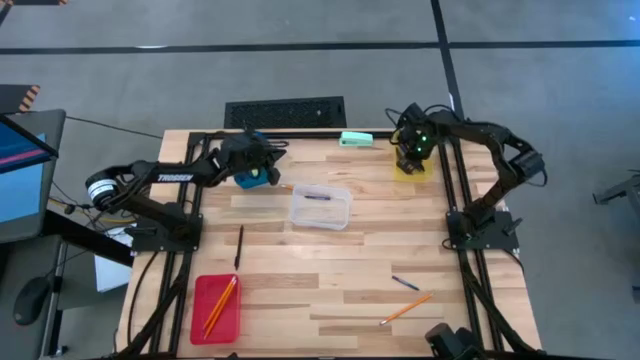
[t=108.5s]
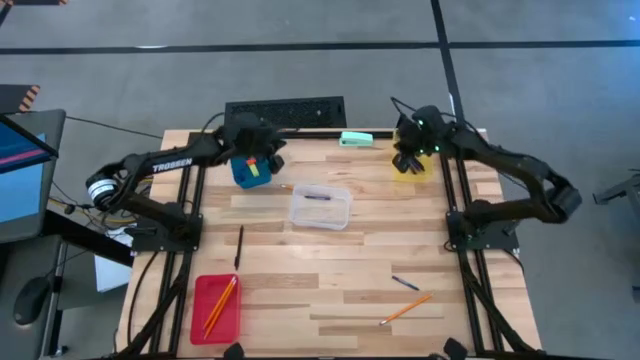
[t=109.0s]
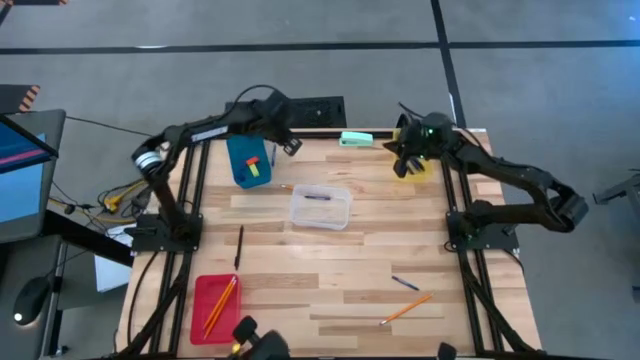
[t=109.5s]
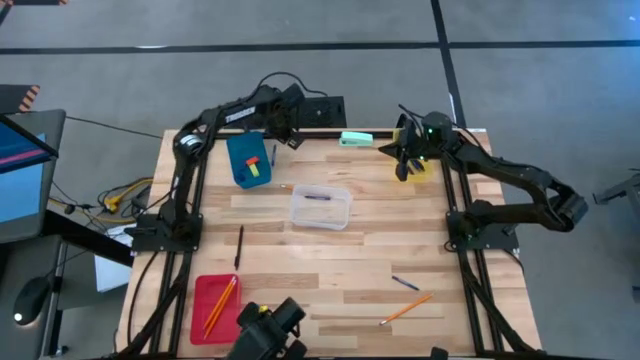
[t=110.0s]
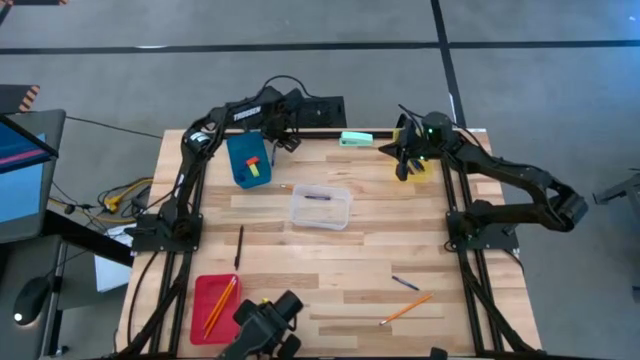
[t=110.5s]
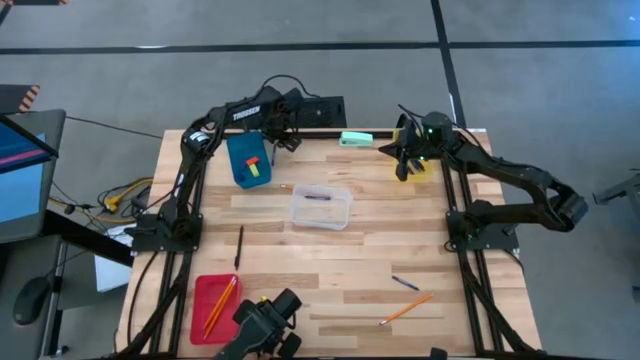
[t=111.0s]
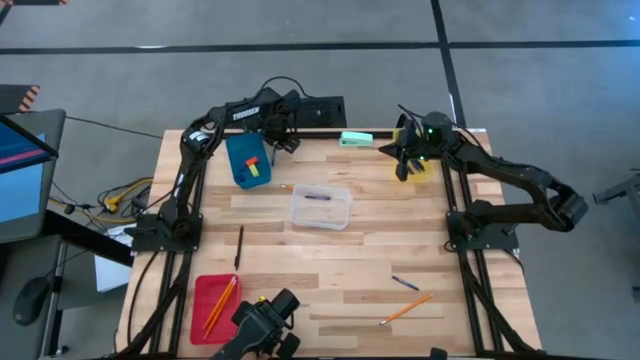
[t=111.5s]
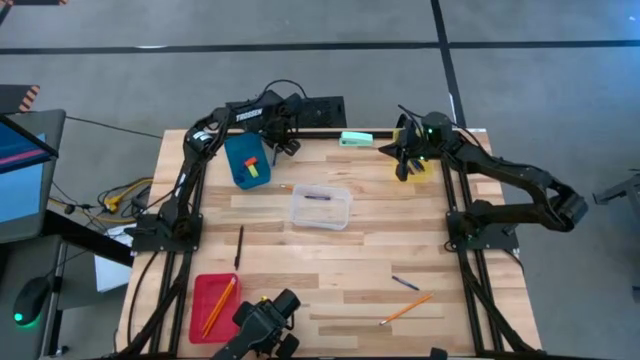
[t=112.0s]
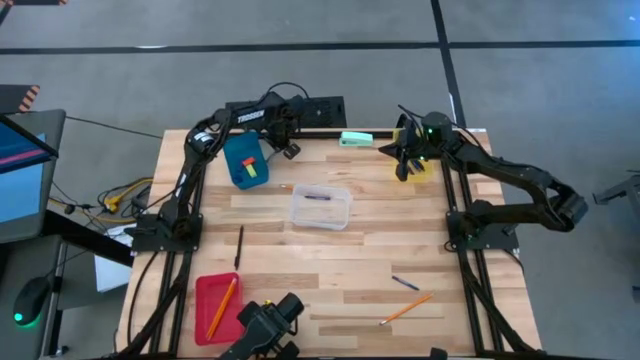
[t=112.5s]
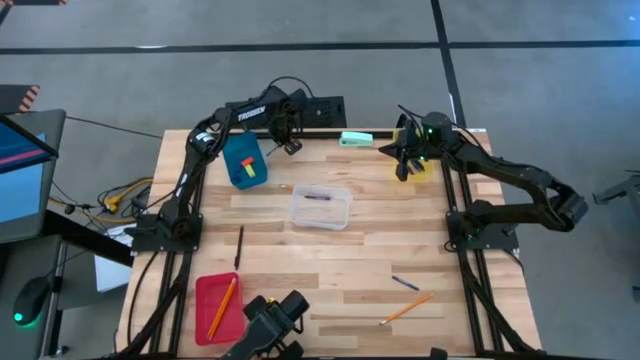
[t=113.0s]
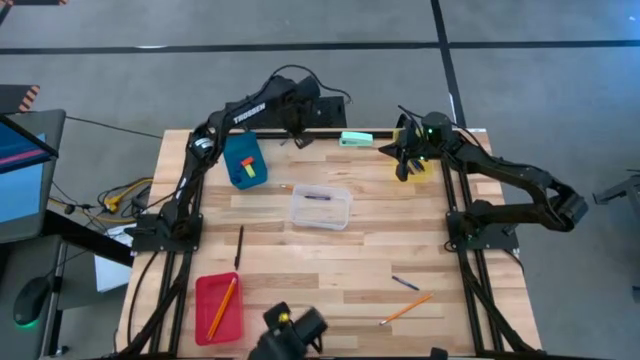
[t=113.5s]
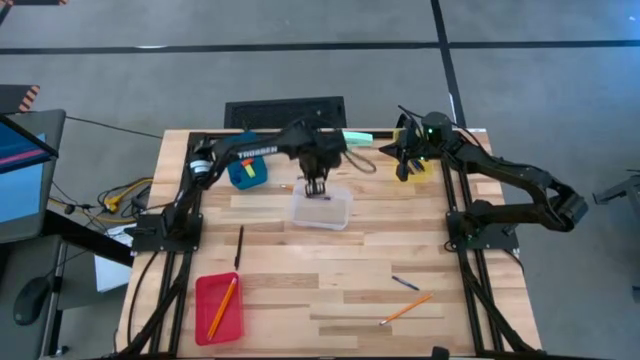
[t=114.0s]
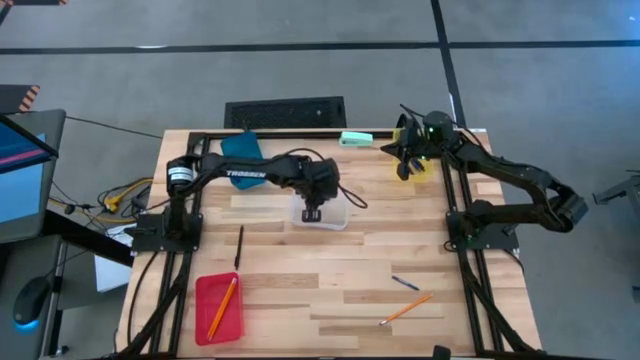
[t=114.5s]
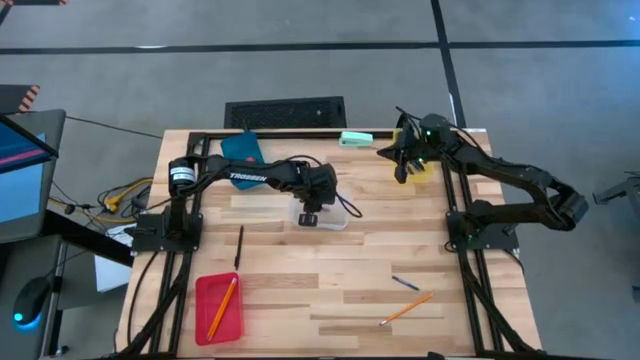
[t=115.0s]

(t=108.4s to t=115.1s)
Task: Sort crayons/erasers/pens/pencils in bins
Put the top blue crayon into the transparent bin

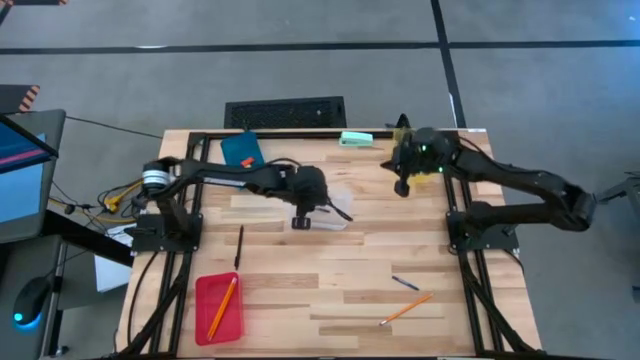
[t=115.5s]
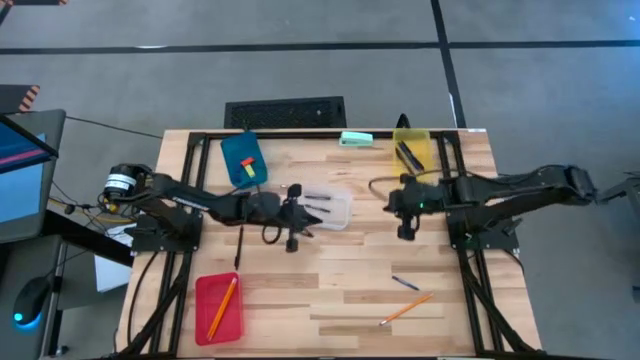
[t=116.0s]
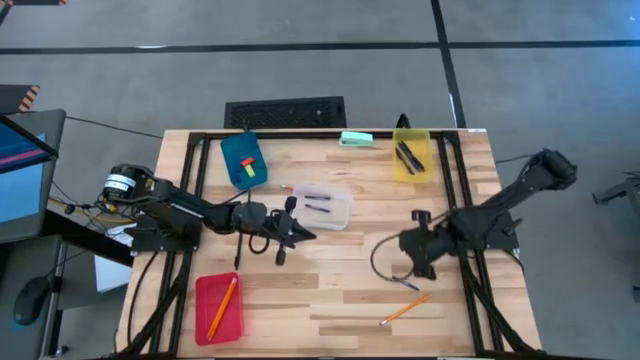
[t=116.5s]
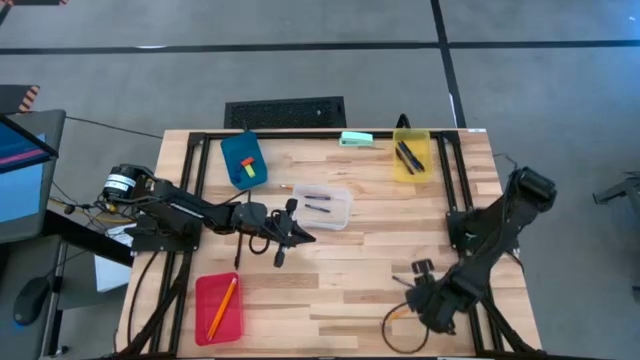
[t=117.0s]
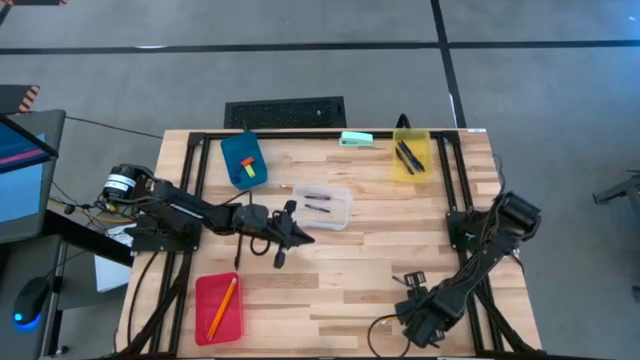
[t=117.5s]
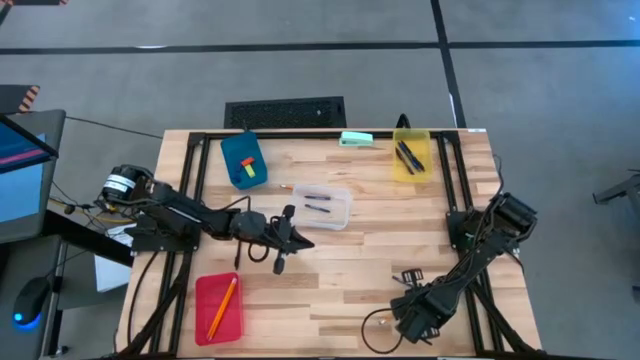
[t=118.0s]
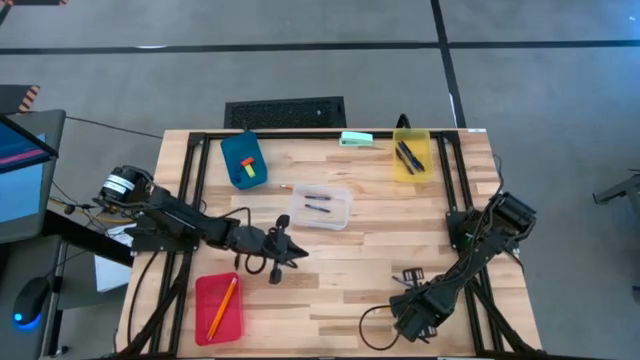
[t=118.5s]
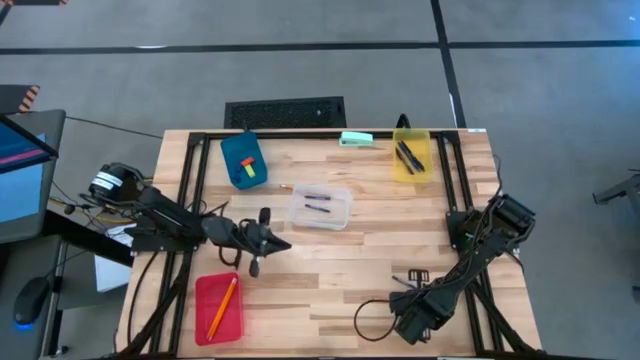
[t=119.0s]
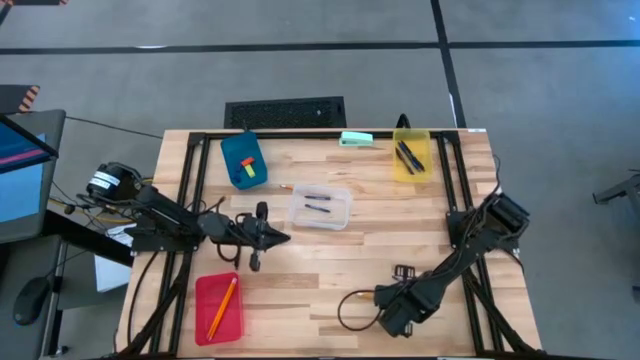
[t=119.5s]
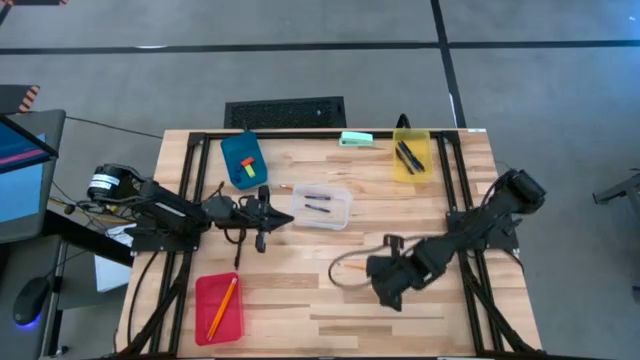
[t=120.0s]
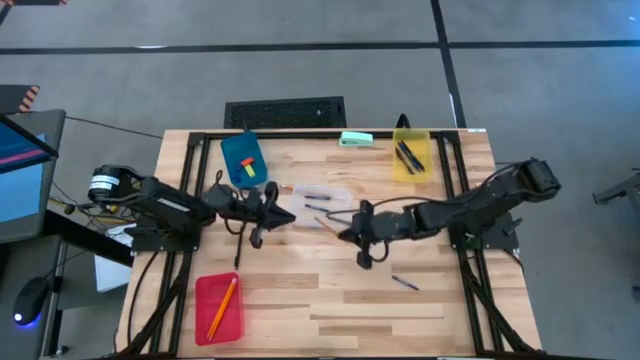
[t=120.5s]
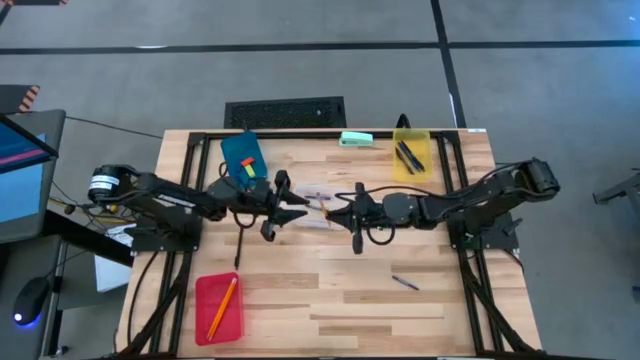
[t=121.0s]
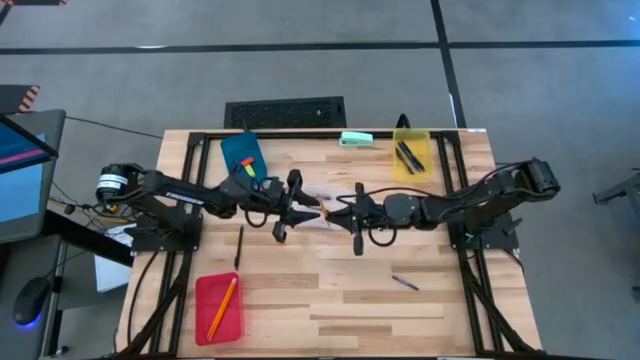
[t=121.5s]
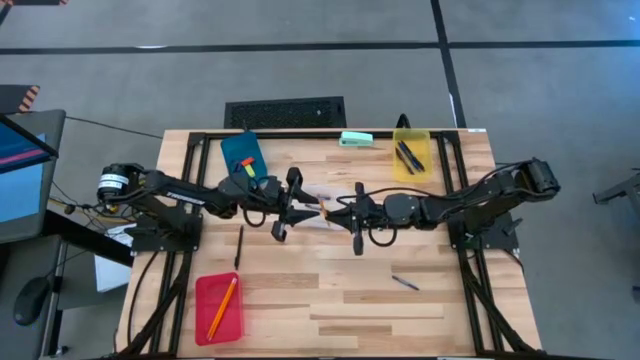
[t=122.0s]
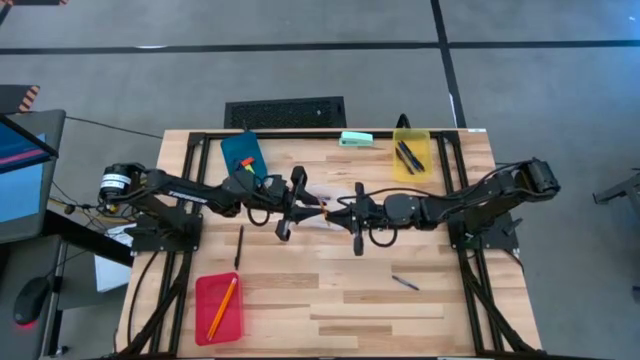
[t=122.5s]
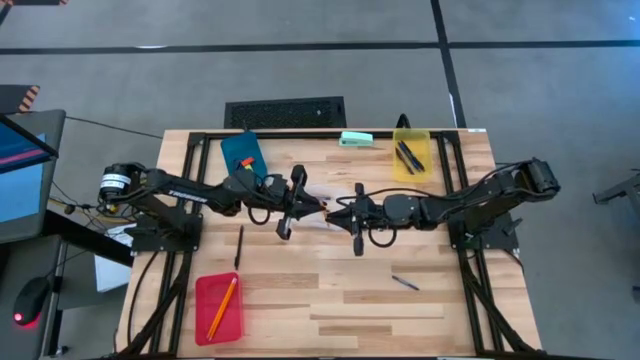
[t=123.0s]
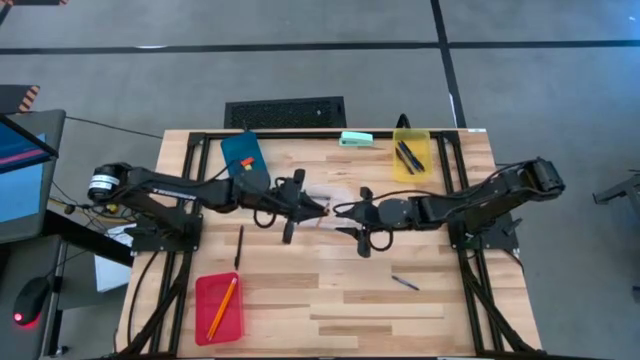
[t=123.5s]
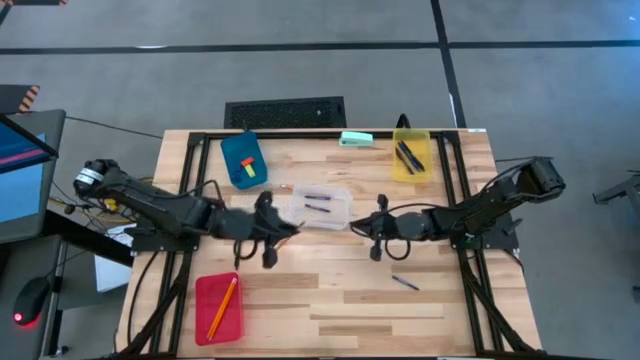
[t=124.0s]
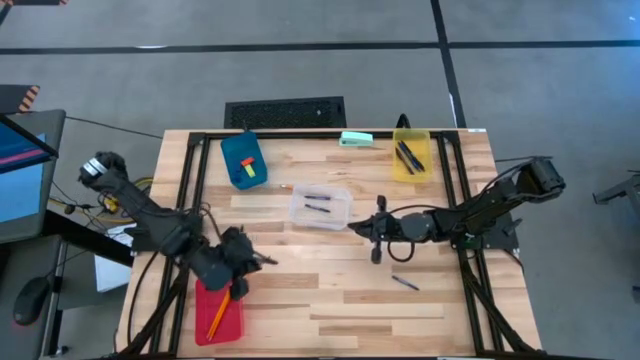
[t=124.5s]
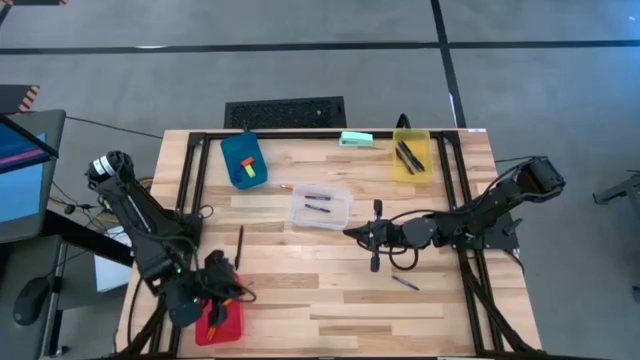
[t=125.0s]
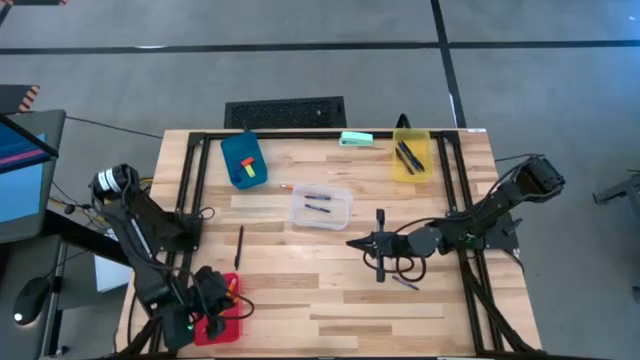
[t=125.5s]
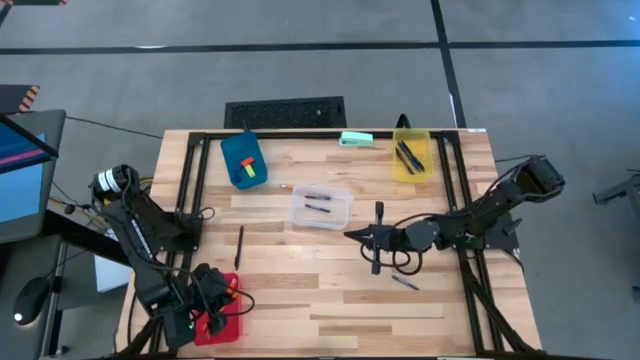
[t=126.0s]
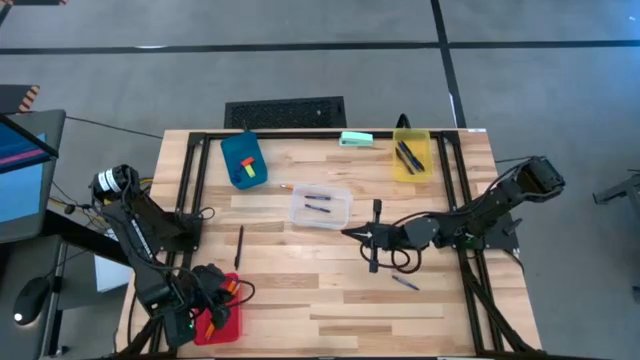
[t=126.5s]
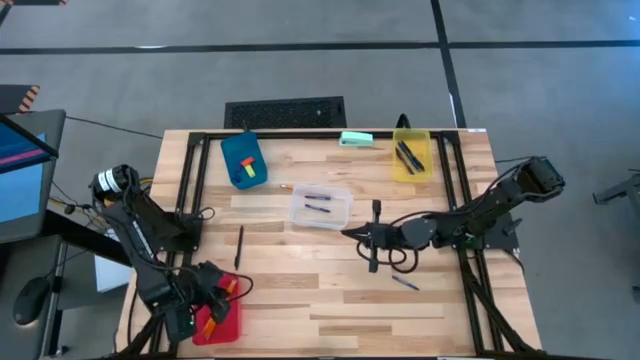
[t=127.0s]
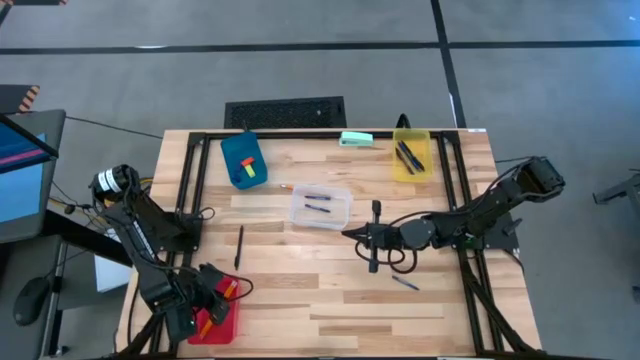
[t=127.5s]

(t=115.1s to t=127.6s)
Put the bottom yellow pencil into the red bin
